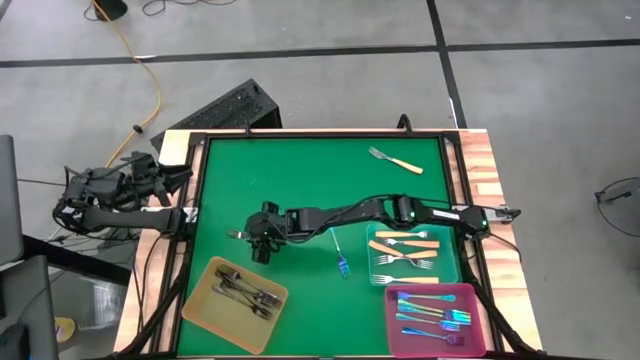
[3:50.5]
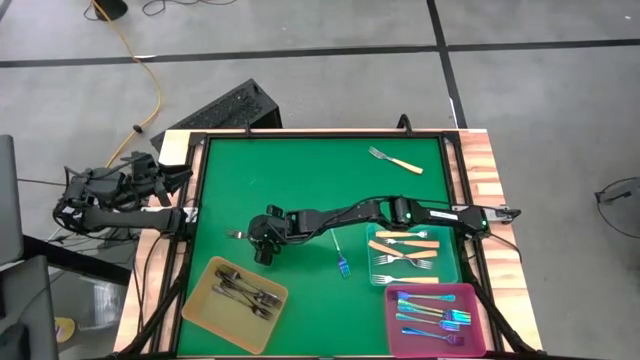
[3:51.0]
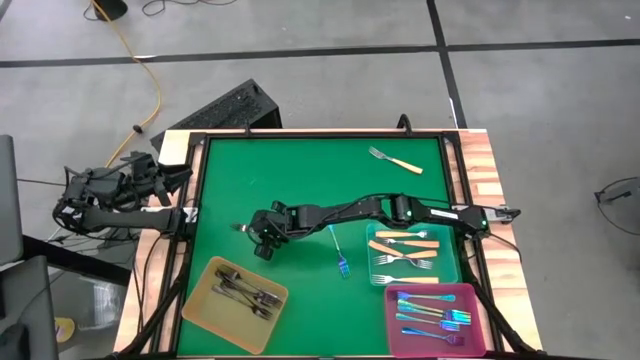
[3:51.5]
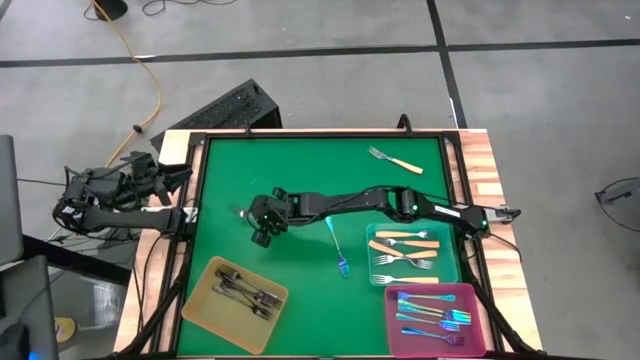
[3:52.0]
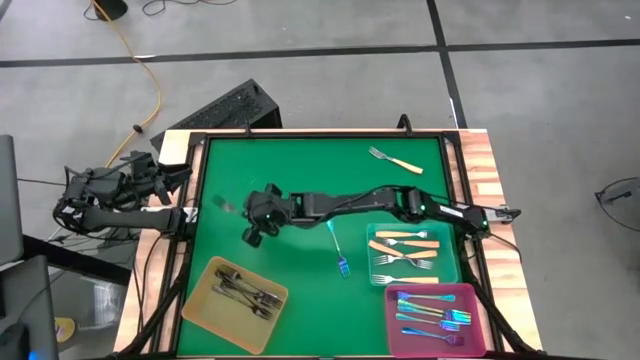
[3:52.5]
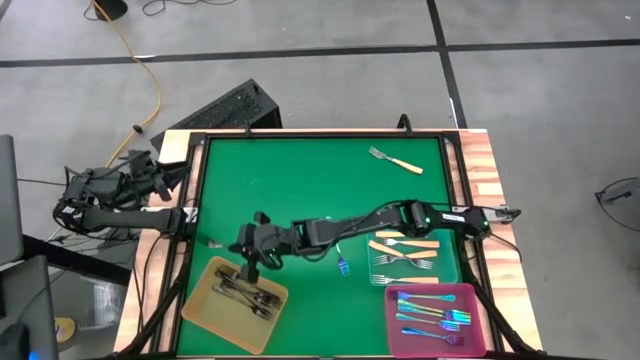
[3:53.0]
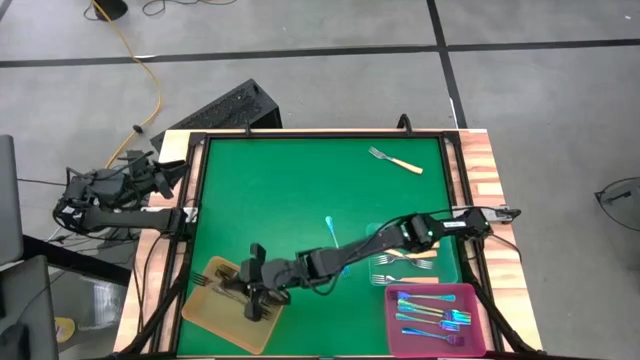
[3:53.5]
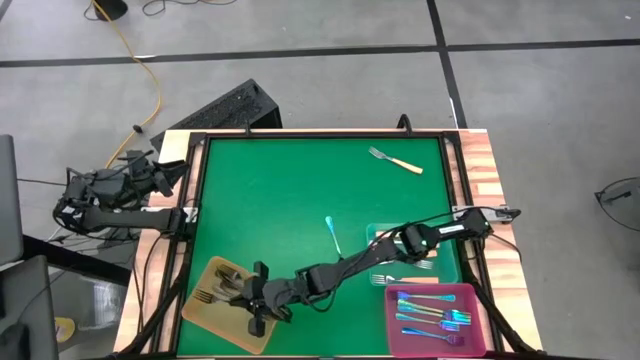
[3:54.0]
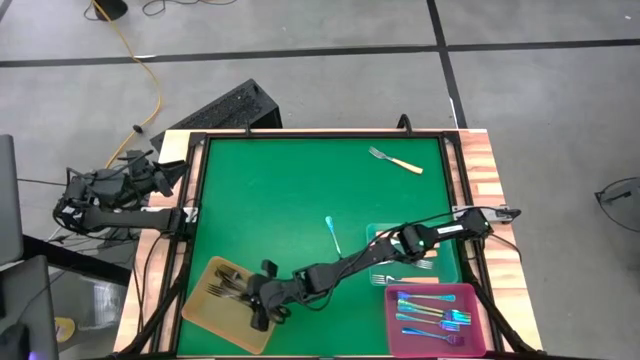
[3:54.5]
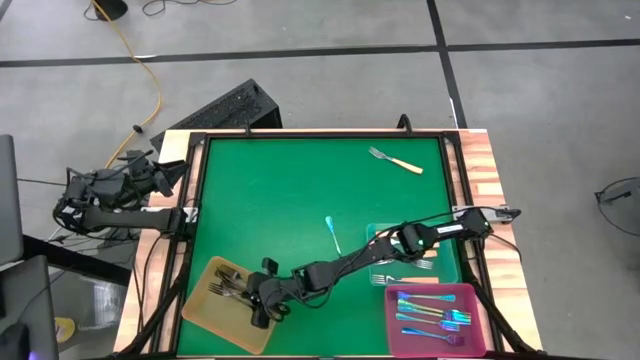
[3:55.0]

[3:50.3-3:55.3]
Task: Sort silverware by color (type)
Put the black fork into the orange bin

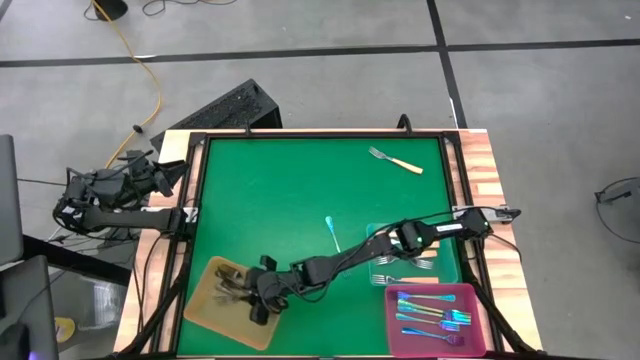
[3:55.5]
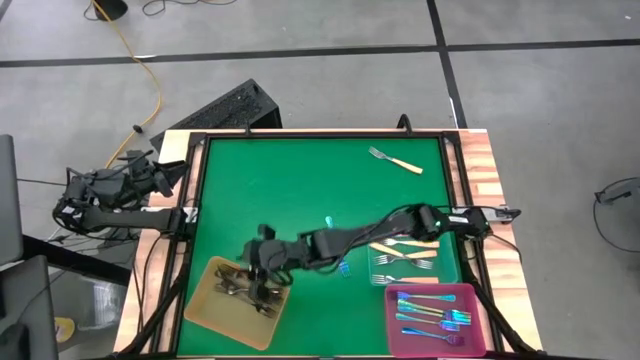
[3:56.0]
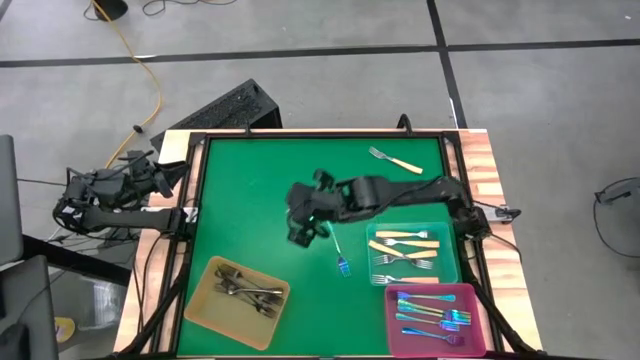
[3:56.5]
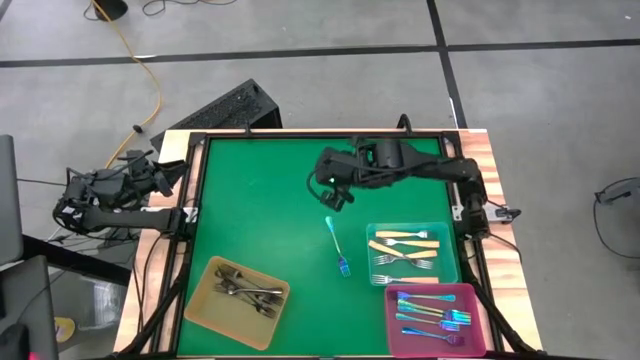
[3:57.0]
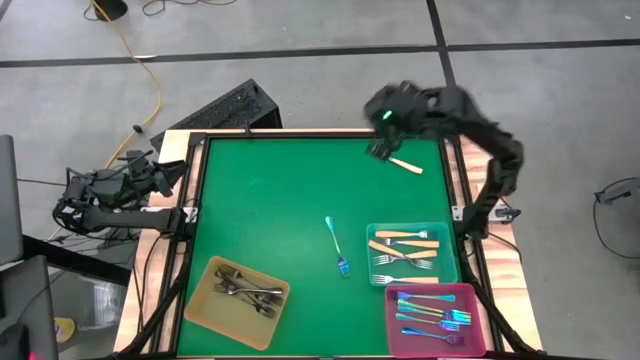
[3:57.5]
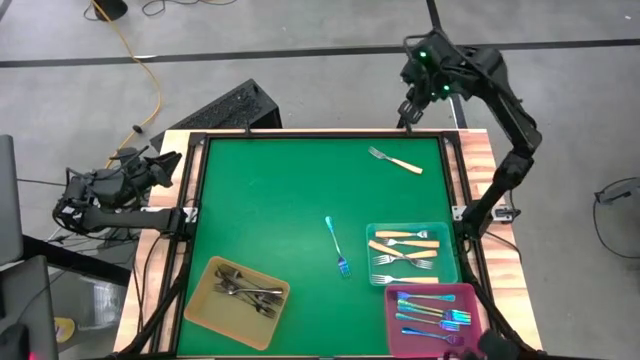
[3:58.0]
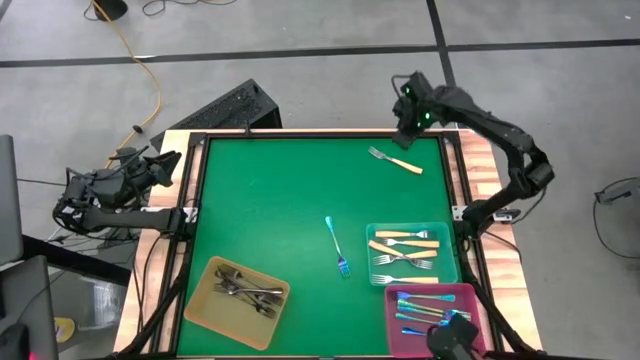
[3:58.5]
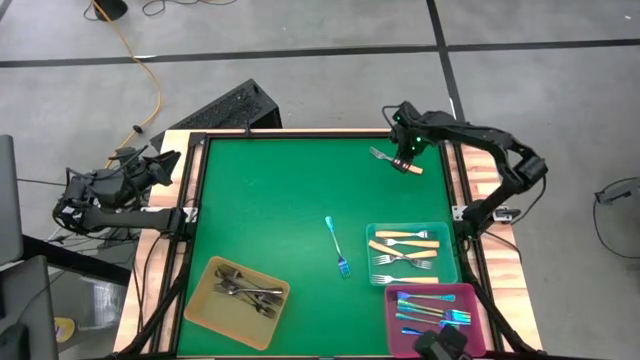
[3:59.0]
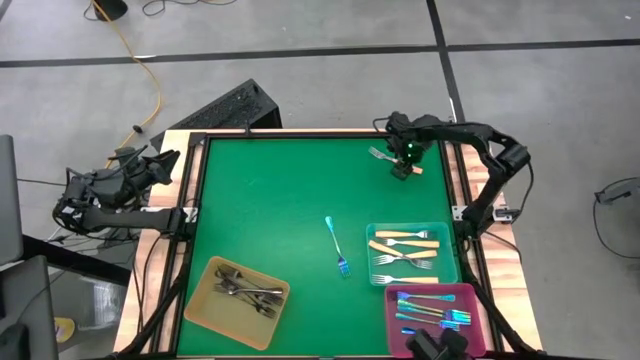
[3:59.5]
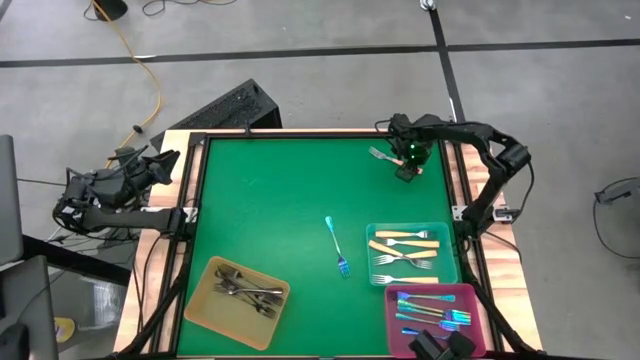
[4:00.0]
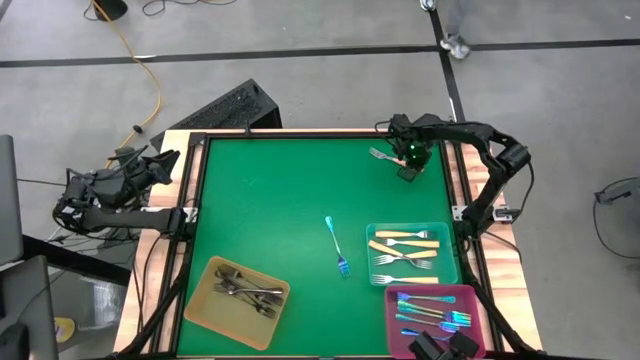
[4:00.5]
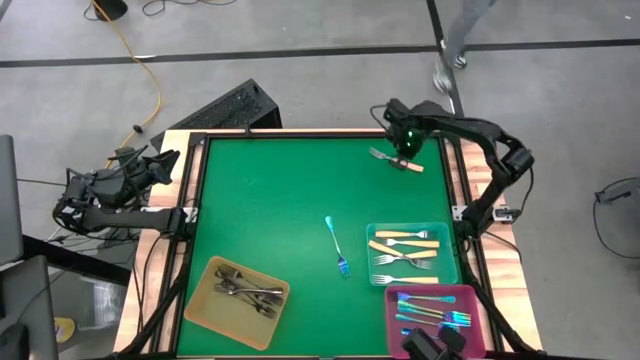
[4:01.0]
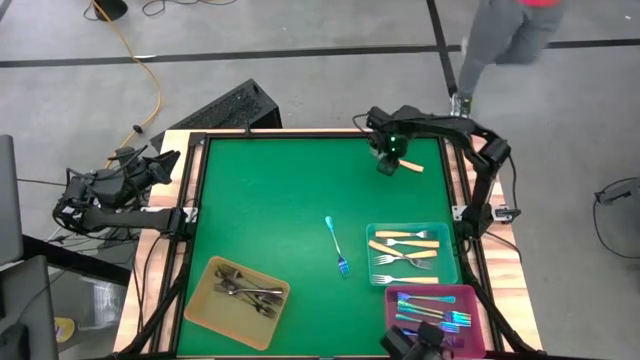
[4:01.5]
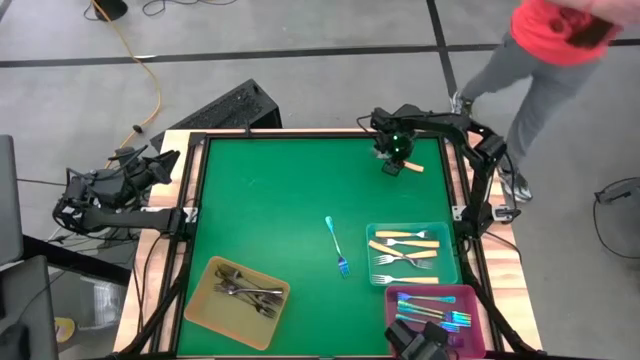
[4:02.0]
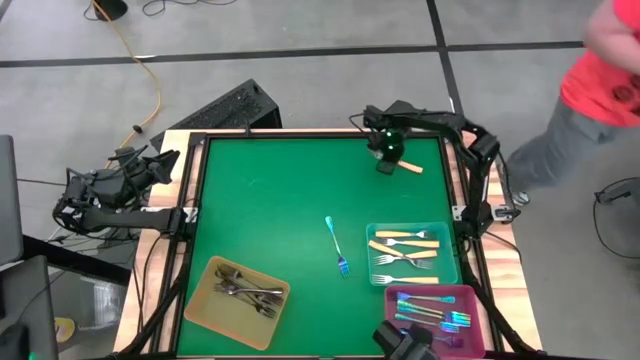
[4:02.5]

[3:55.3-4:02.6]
Put the yellow fork into the green bin

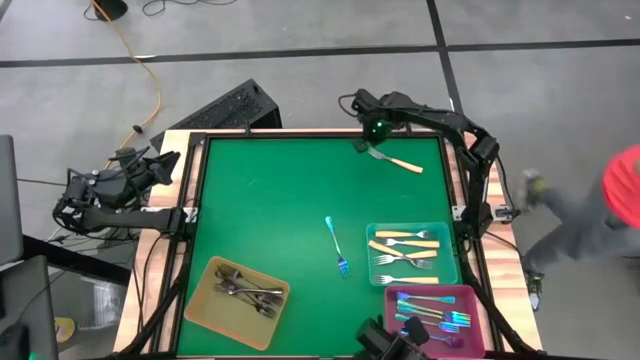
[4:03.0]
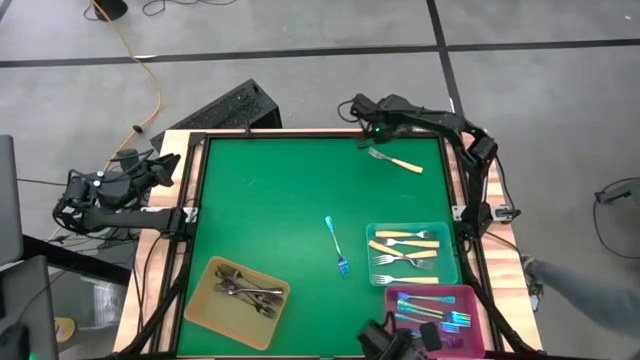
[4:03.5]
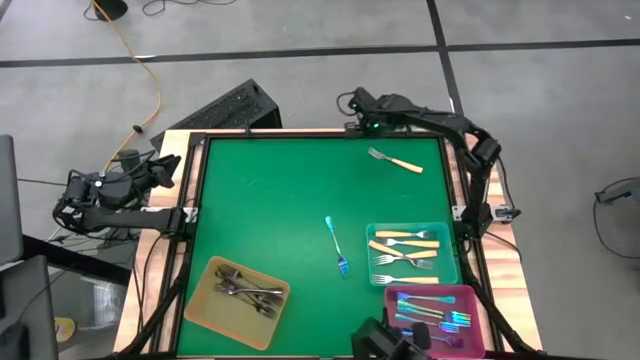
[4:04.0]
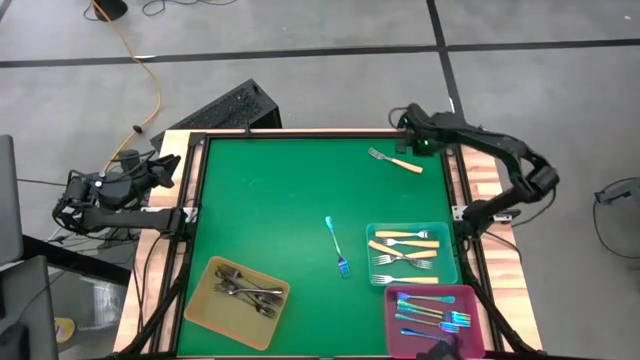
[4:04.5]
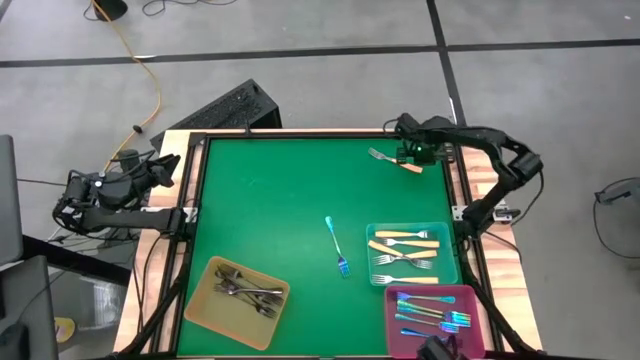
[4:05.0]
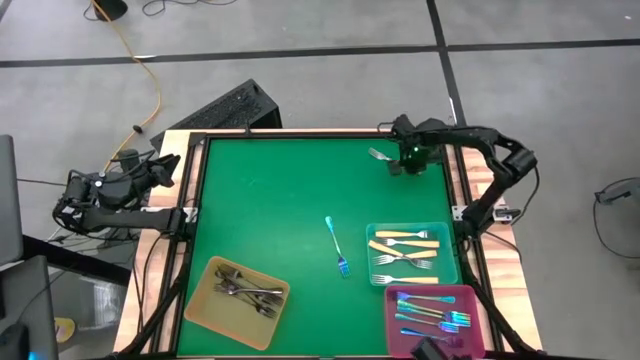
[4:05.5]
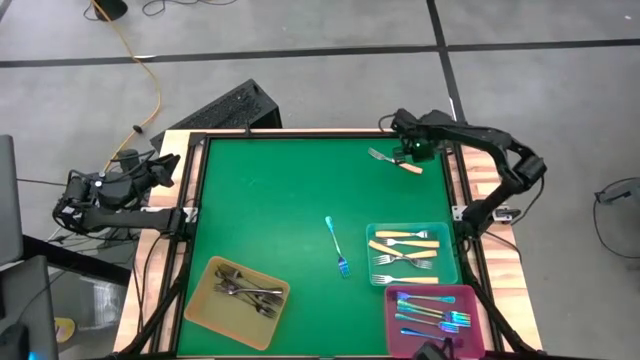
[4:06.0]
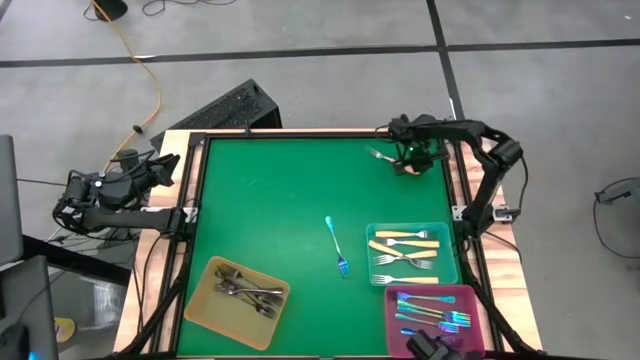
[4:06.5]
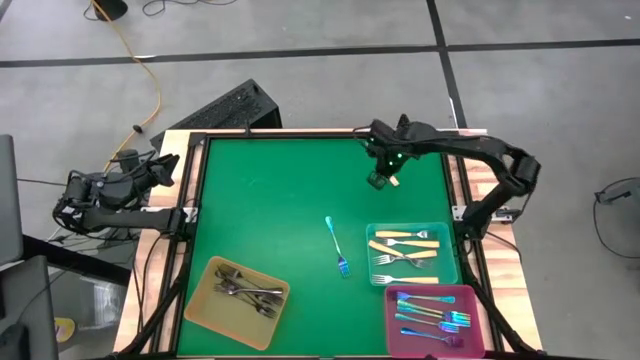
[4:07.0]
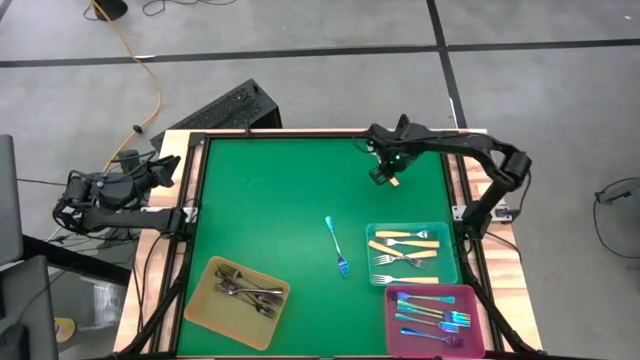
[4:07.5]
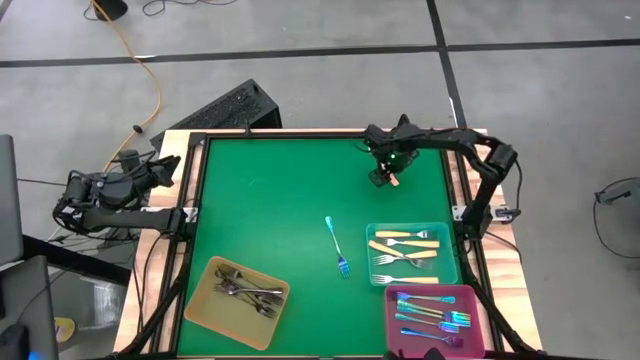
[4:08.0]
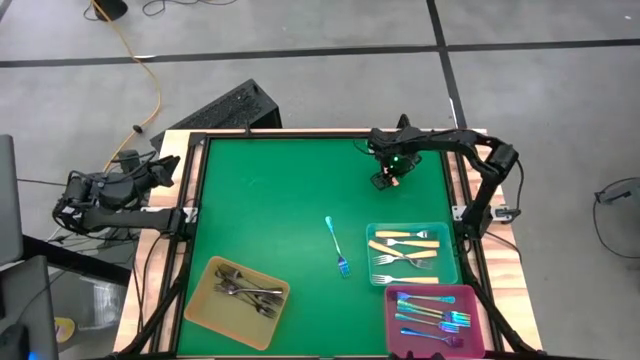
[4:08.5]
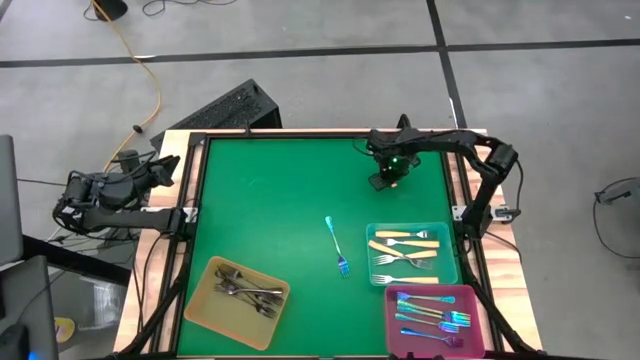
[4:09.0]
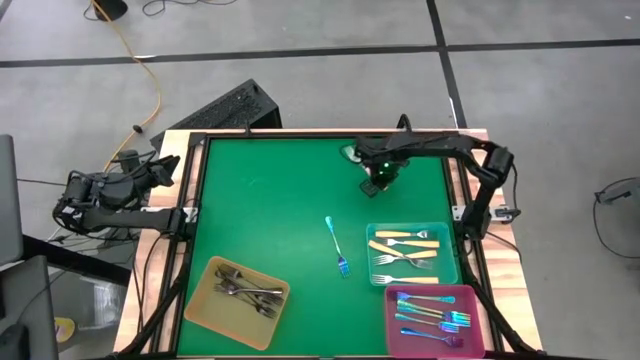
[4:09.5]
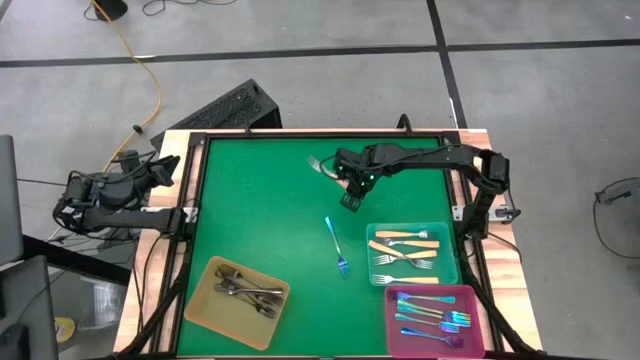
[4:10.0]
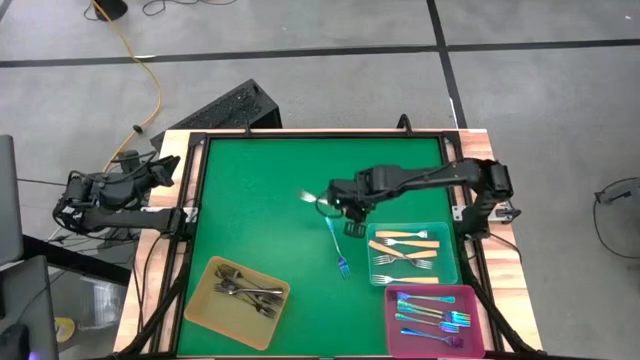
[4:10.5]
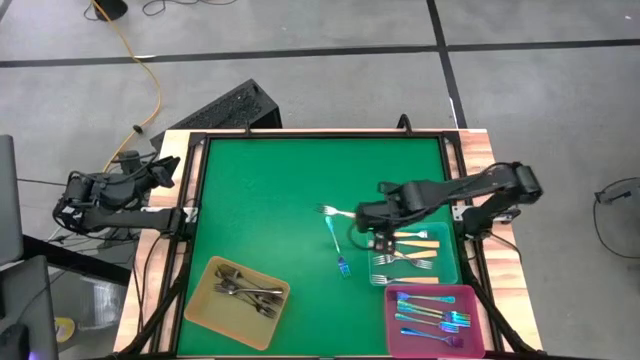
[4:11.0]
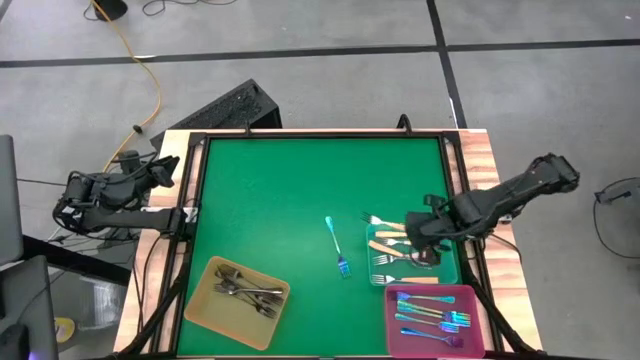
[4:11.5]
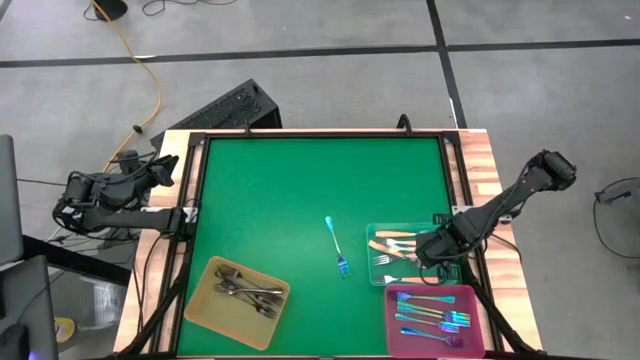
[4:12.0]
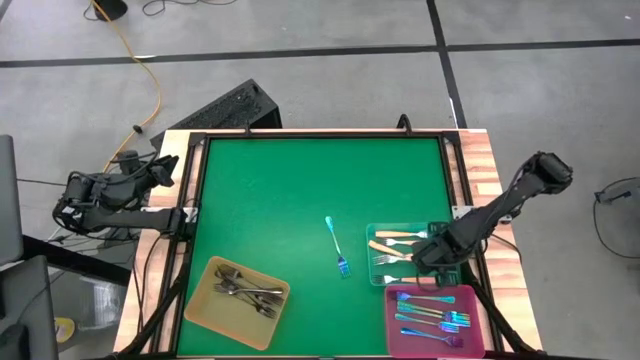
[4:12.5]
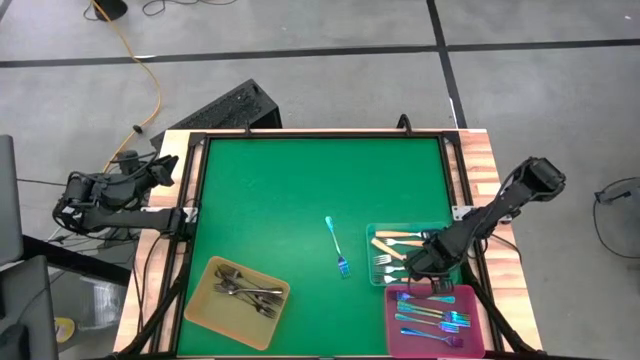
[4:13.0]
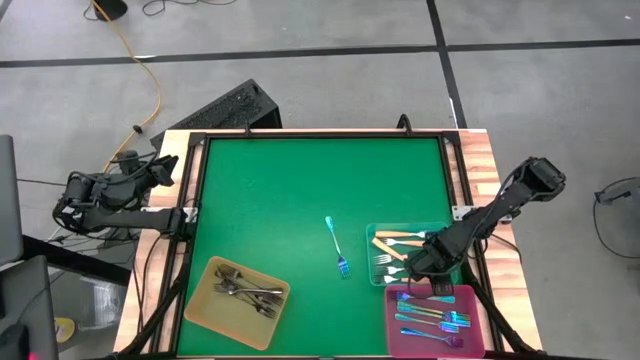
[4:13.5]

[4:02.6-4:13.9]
Put the yellow fork into the green bin
